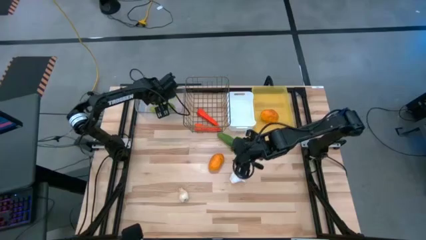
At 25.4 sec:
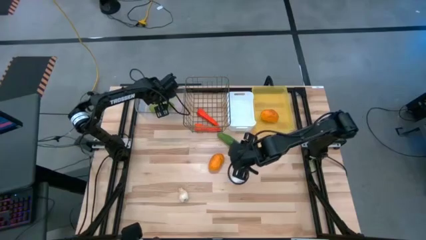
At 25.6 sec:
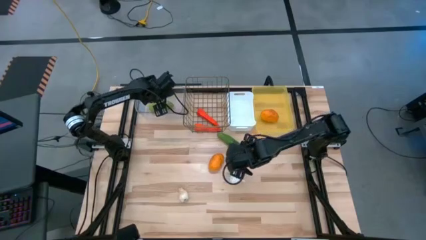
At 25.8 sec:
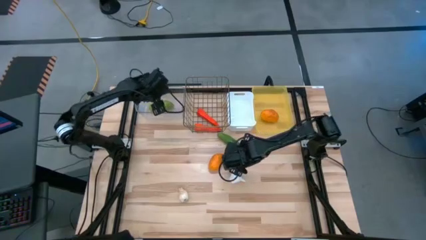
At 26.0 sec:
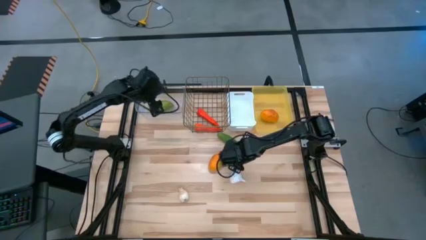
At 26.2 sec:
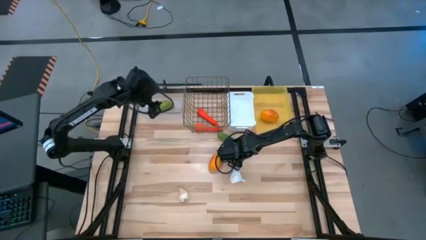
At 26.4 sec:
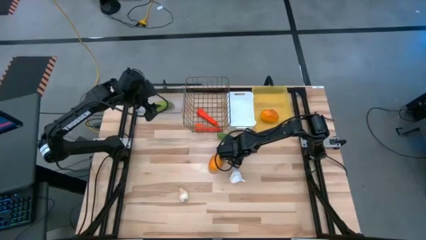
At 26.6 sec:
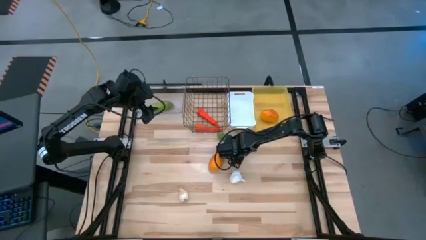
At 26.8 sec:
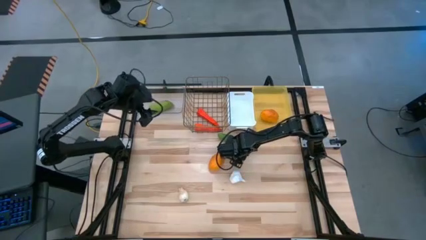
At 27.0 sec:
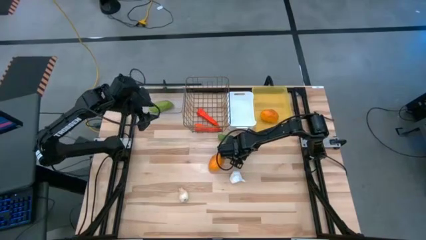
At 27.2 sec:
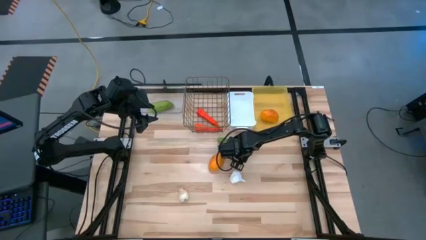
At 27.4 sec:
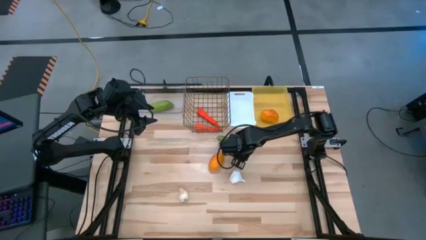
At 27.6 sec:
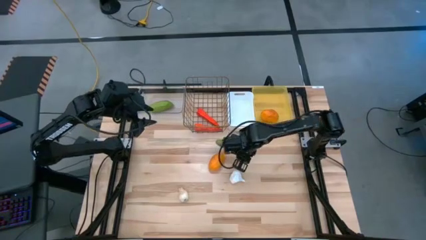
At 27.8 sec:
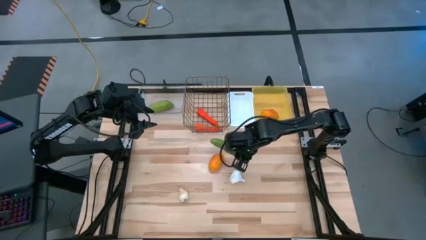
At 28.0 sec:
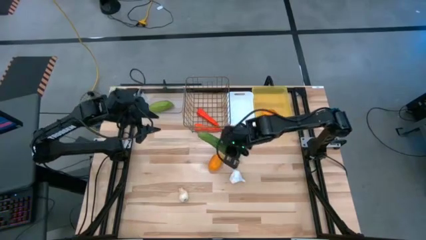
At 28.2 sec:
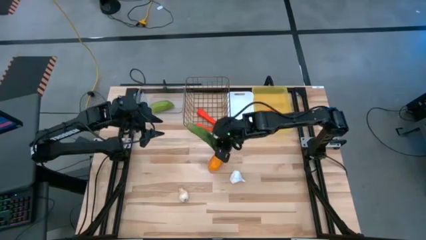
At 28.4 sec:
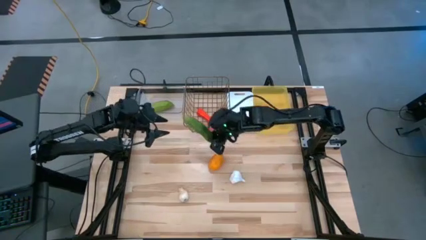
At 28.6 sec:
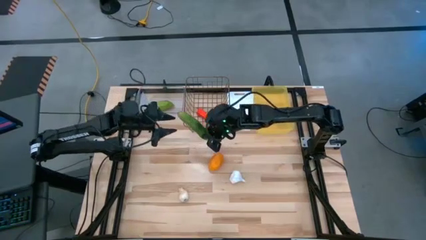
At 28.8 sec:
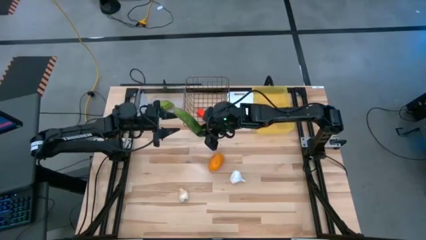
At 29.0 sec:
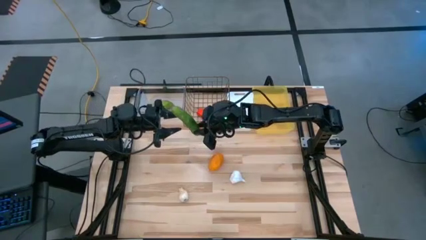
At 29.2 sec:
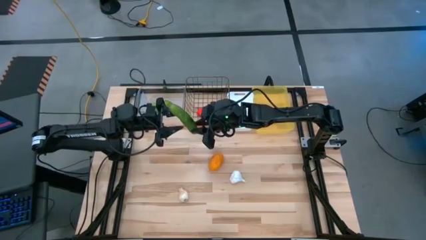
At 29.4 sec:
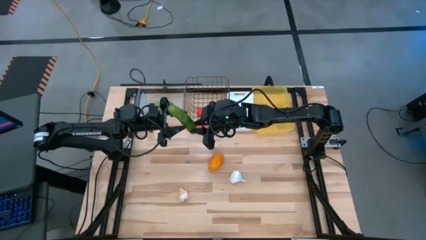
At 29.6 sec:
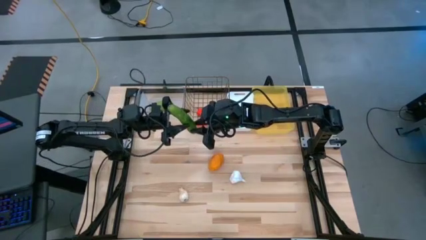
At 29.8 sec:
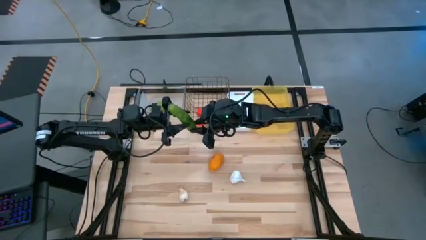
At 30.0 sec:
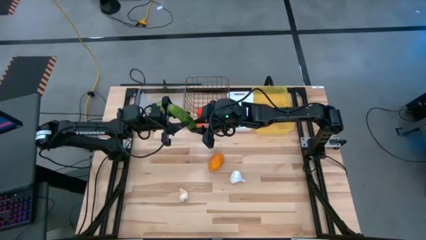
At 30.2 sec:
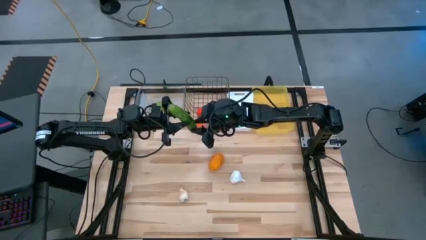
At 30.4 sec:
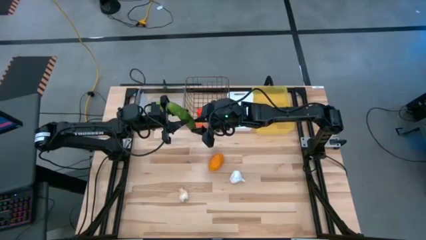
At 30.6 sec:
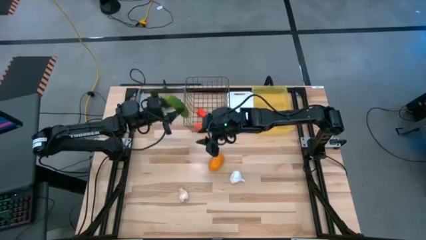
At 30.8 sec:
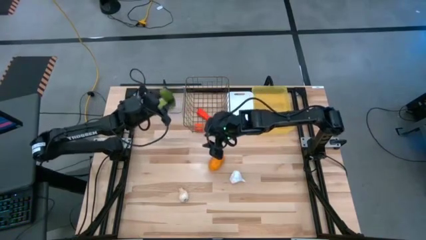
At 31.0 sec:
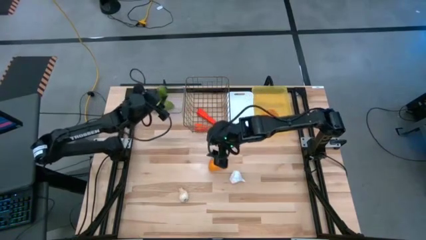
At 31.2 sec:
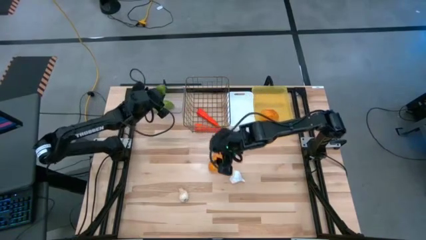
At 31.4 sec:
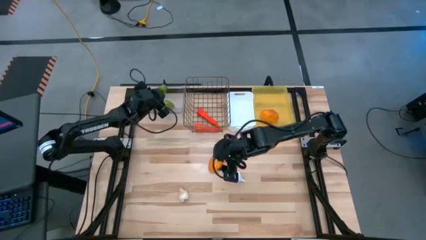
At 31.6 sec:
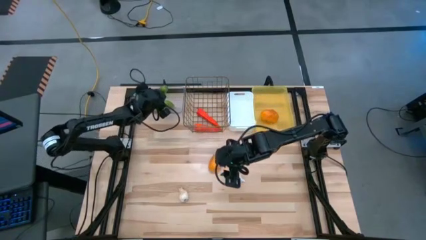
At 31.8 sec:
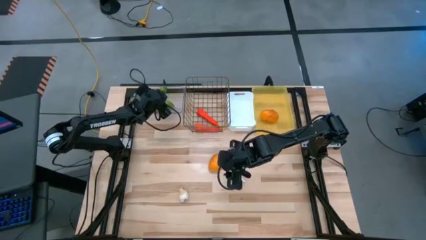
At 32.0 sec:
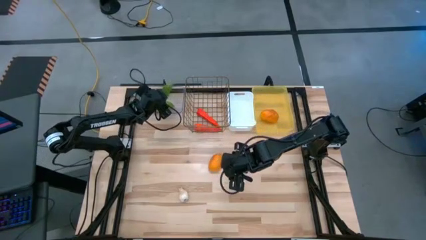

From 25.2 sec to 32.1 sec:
Task: Sort produce into baskets
Put the cucumber into the transparent bin

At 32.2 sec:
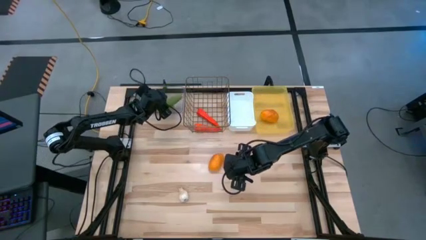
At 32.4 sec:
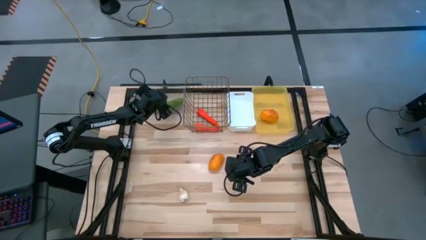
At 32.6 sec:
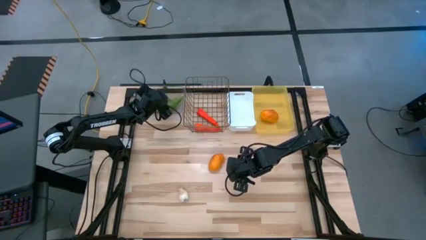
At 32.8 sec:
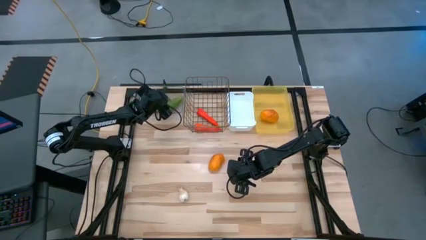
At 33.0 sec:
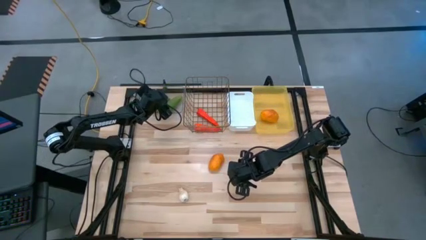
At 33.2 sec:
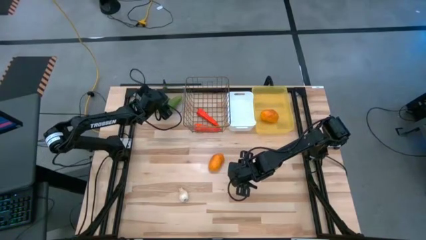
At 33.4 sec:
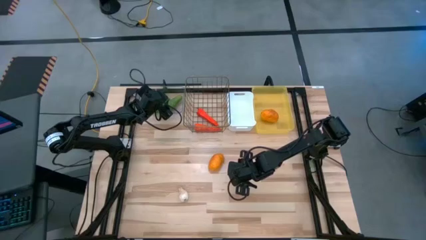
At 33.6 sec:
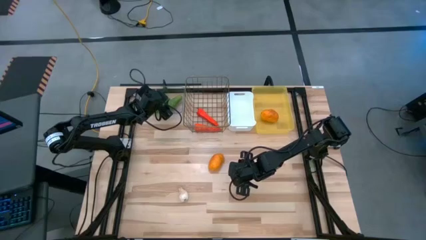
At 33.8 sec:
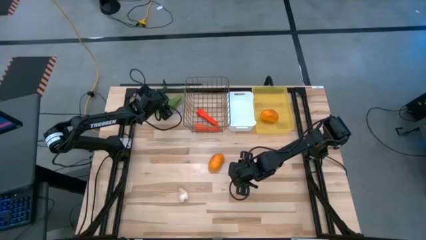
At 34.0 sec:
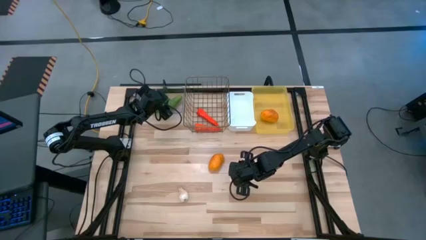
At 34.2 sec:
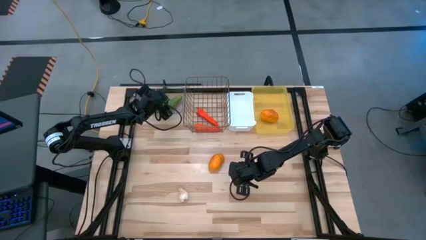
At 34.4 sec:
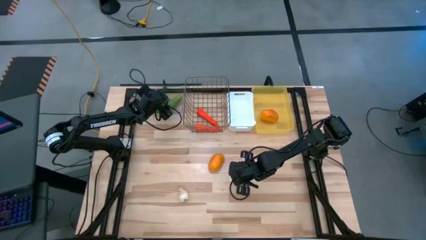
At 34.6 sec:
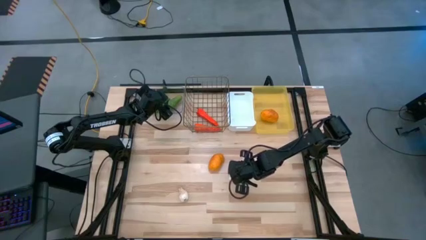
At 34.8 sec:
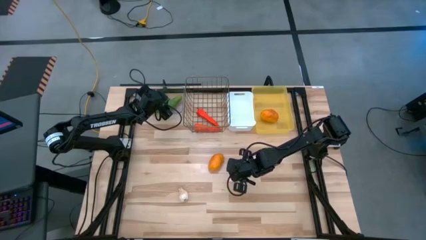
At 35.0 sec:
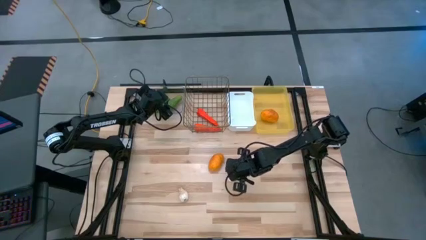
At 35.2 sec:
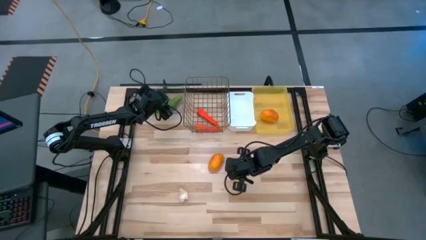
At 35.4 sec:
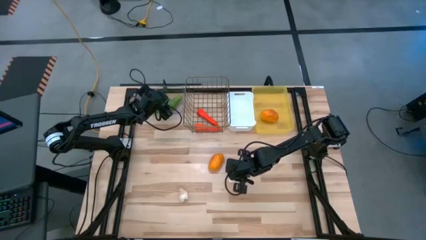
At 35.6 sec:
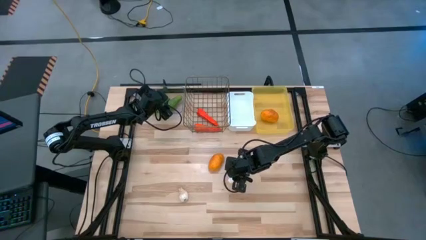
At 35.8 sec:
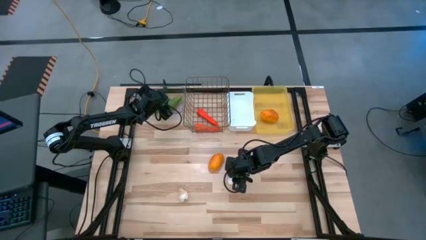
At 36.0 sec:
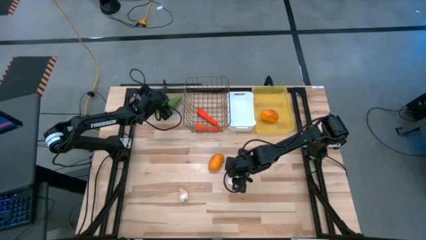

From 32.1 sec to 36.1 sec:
Put the top garlic into the white bin

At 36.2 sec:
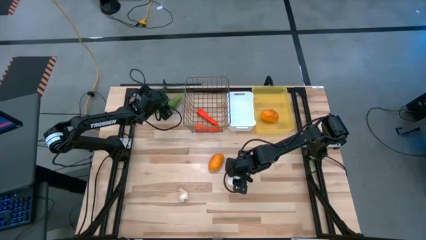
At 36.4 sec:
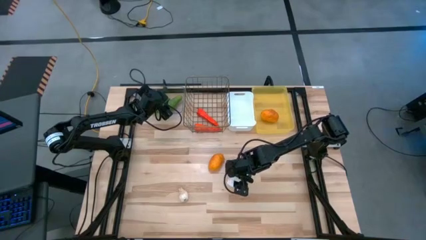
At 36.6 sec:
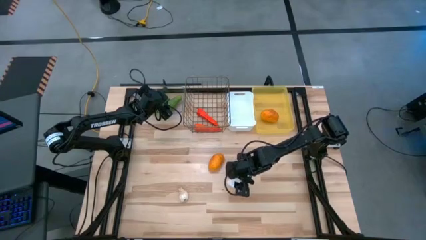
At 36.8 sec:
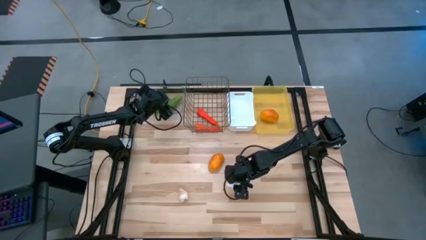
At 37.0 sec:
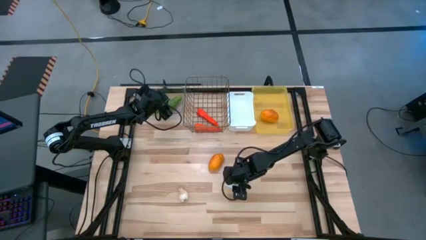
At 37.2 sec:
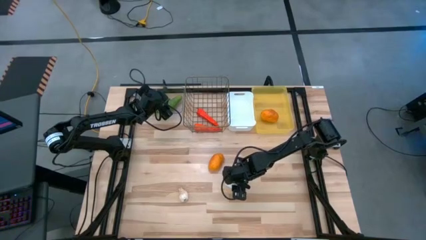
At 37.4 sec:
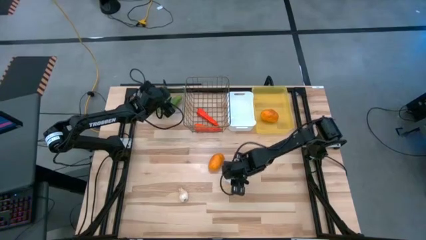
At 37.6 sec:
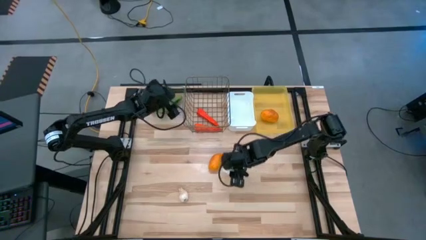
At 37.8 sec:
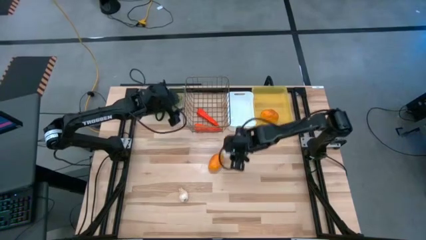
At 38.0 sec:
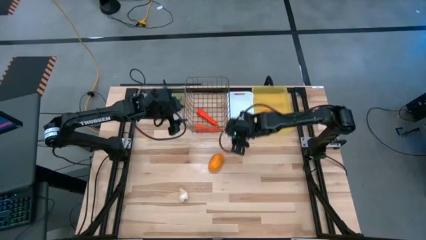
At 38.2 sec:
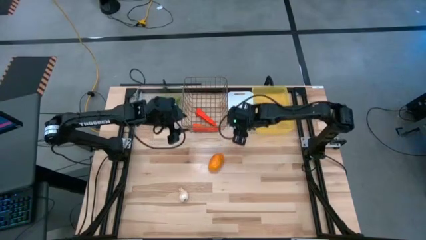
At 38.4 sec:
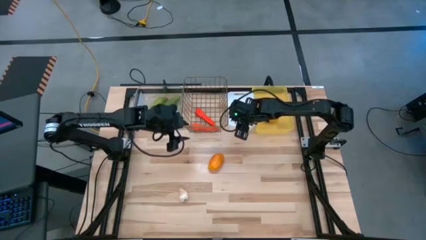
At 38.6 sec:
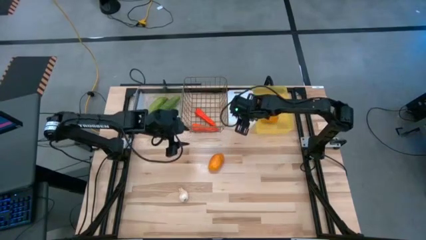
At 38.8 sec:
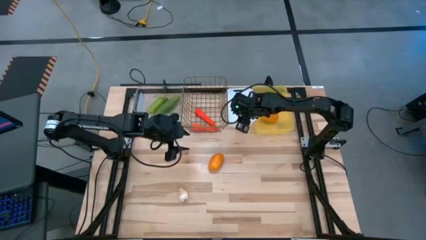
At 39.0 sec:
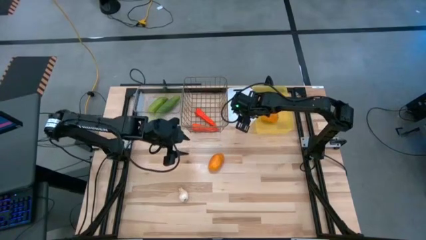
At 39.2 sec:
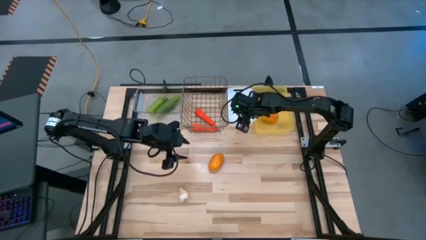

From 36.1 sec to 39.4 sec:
Put the top garlic into the white bin

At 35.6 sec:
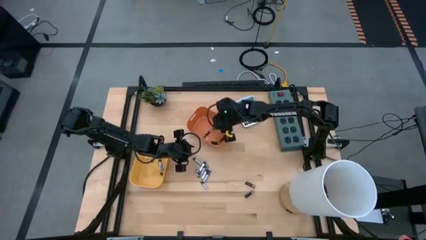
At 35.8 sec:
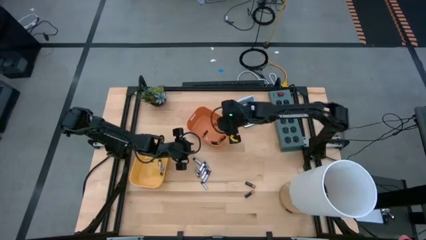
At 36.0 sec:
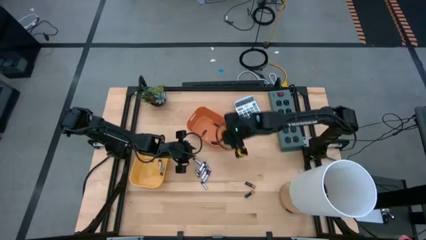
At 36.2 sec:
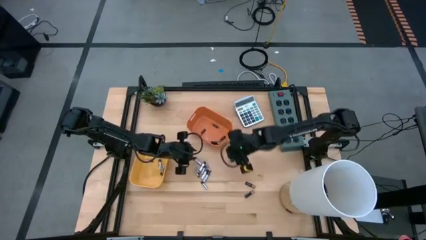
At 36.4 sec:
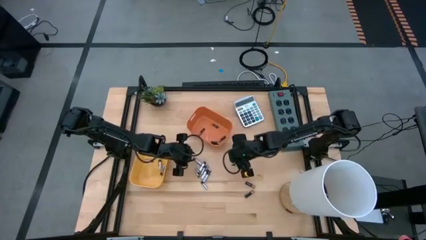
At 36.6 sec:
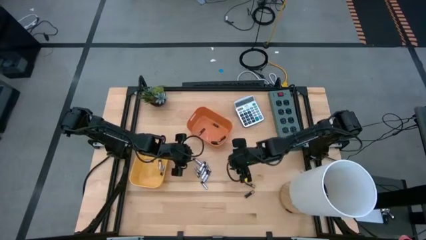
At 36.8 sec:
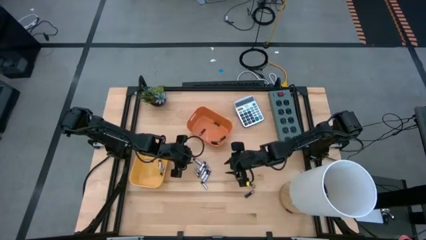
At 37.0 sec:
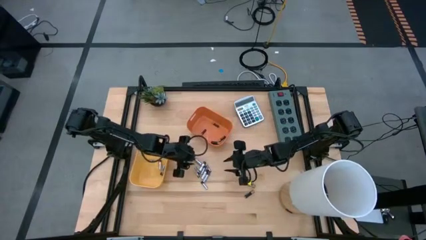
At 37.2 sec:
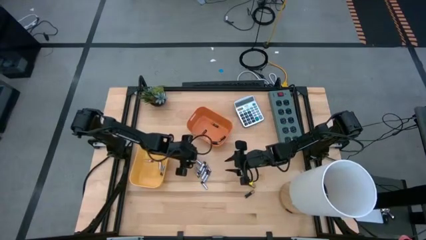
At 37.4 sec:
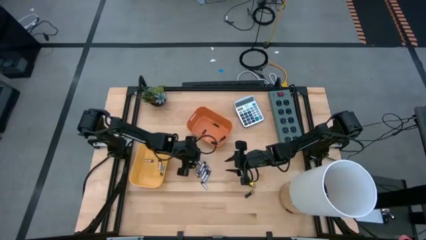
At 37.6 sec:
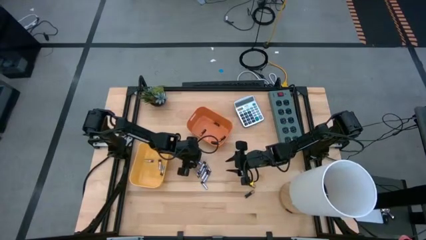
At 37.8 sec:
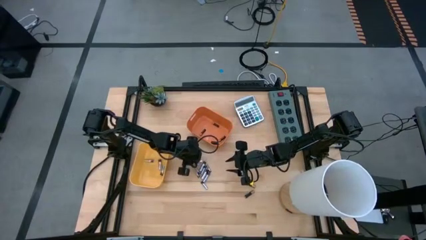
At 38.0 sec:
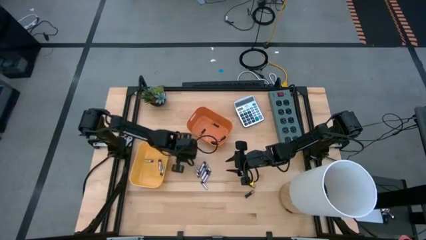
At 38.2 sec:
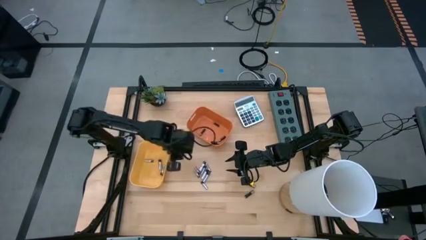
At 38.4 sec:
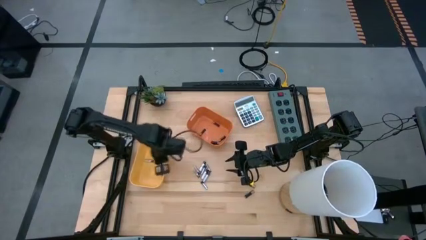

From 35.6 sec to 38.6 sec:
Task: Sort batteries
Put the silver battery into the yellow bin
